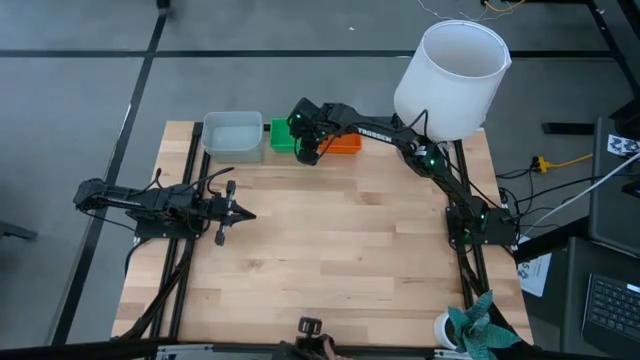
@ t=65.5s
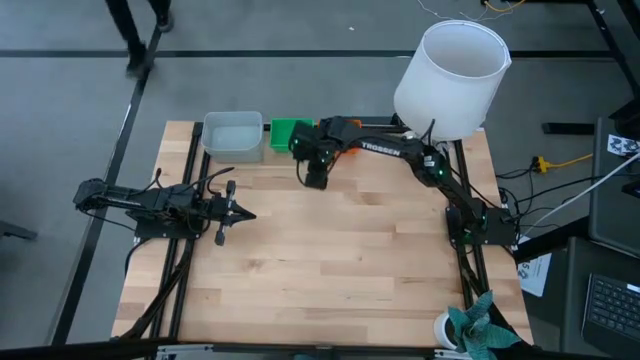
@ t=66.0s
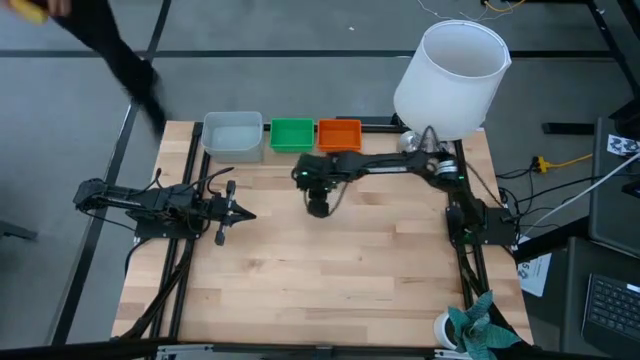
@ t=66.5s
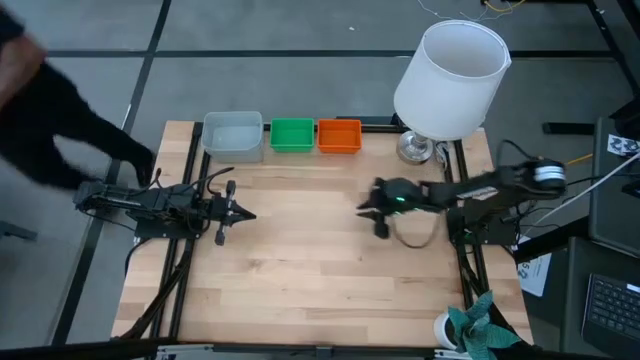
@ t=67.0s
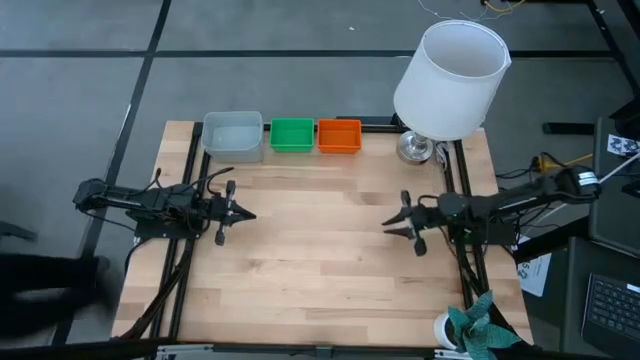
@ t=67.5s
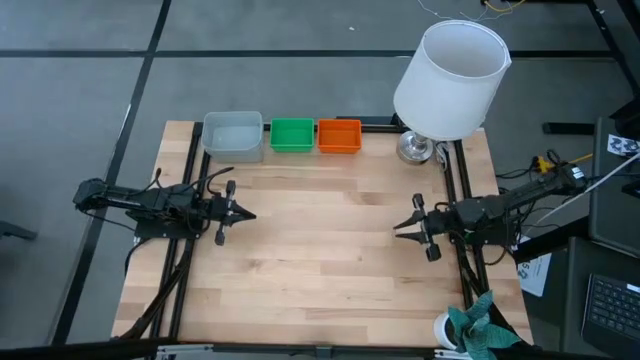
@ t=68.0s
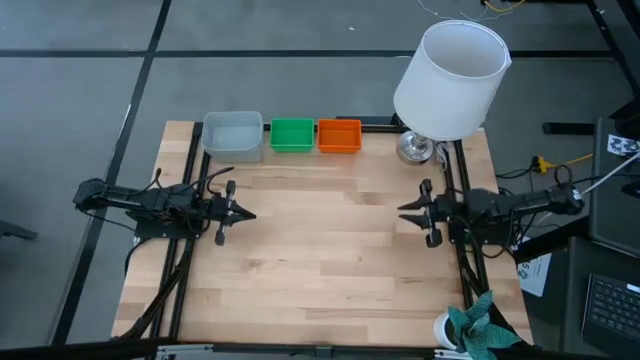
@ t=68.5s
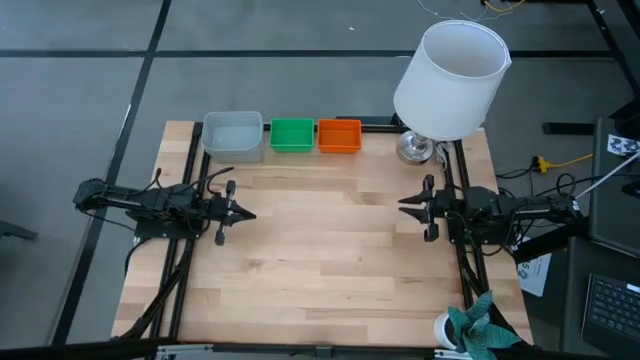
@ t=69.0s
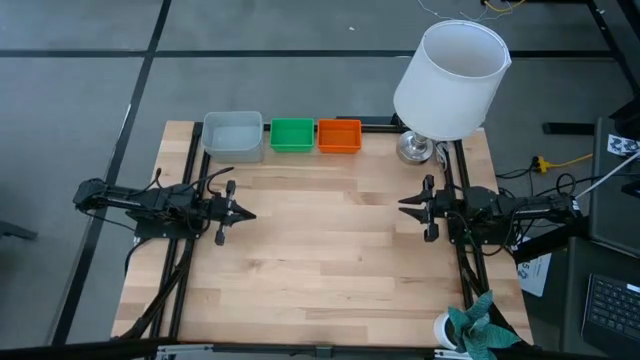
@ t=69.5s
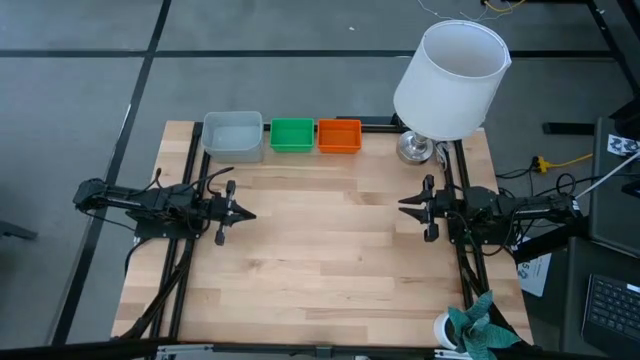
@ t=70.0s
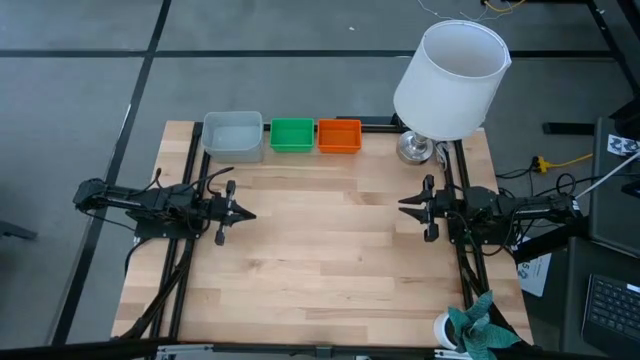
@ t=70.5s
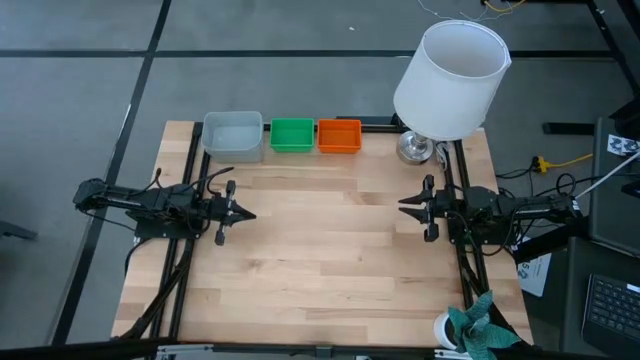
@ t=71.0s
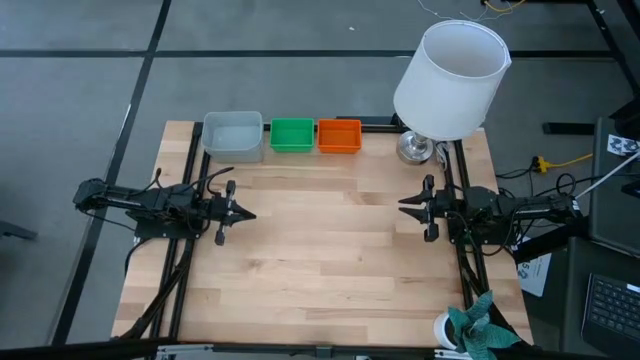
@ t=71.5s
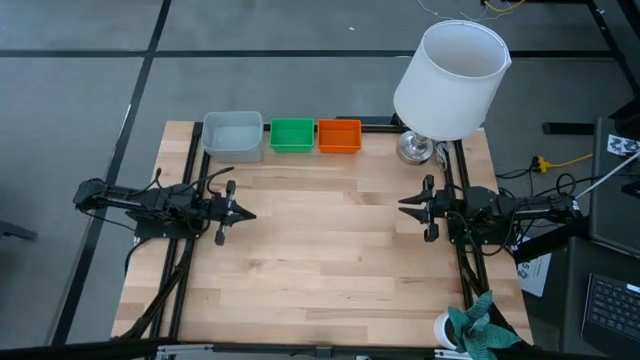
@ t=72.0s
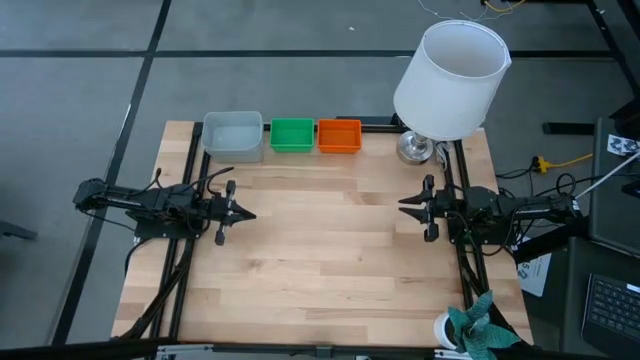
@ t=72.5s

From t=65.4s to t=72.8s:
Return to Home Position

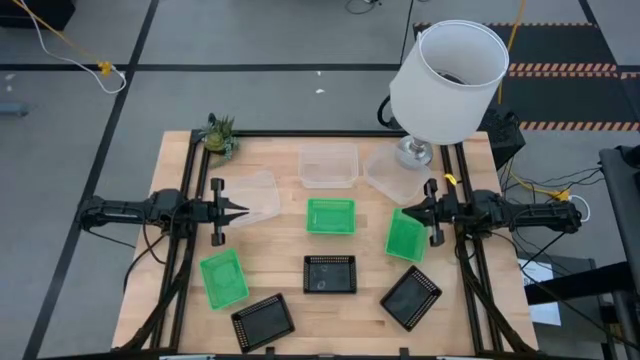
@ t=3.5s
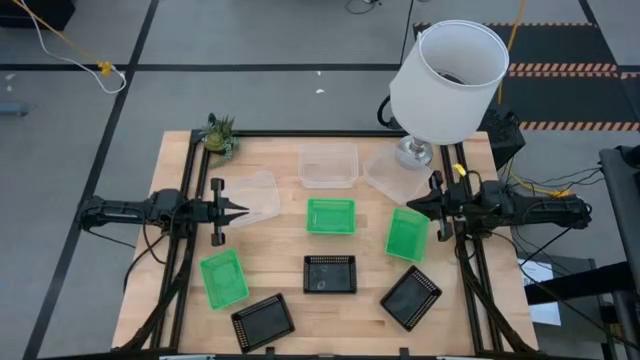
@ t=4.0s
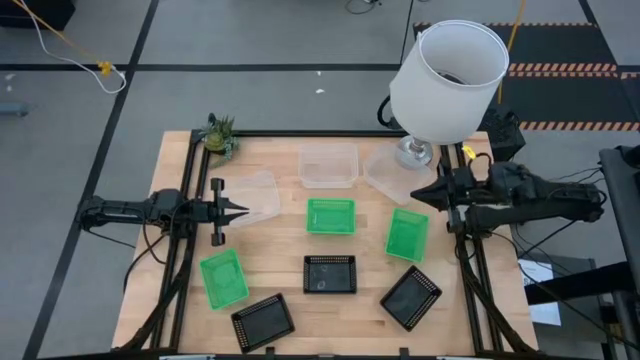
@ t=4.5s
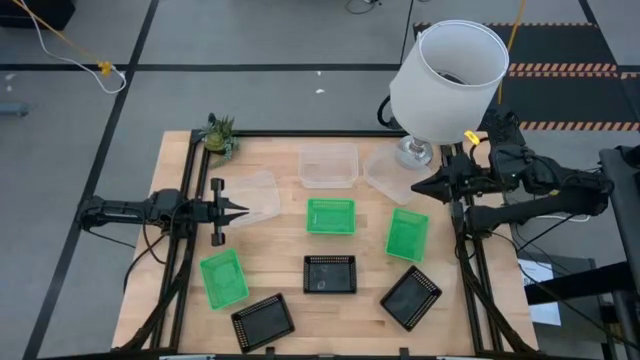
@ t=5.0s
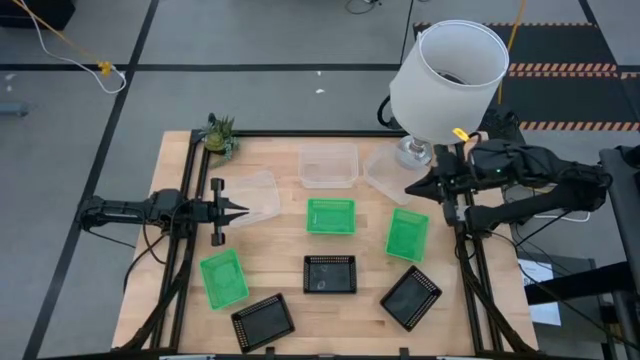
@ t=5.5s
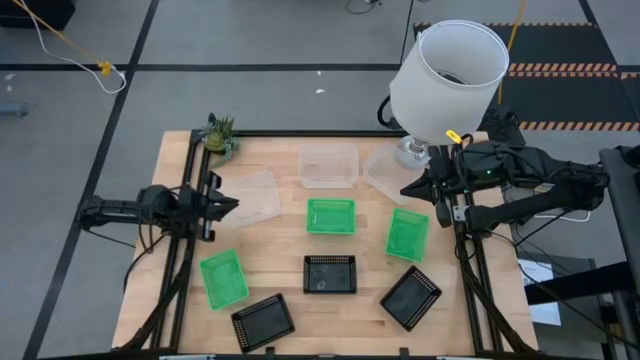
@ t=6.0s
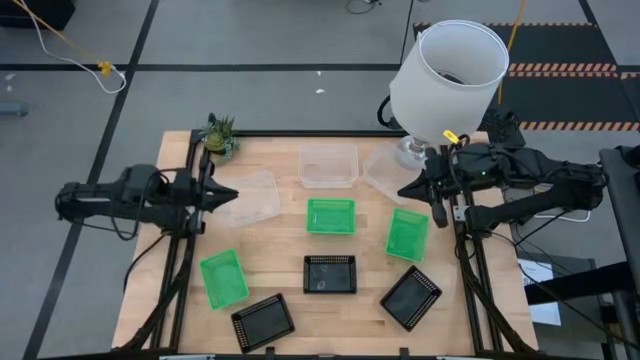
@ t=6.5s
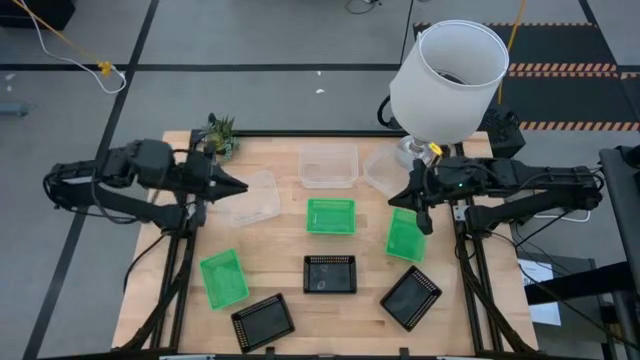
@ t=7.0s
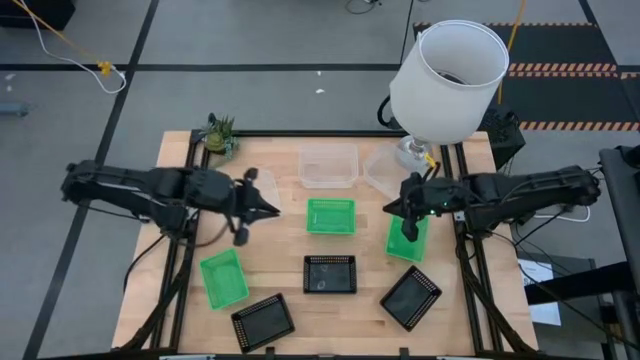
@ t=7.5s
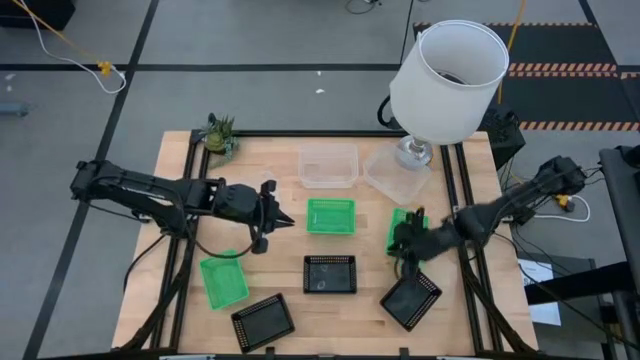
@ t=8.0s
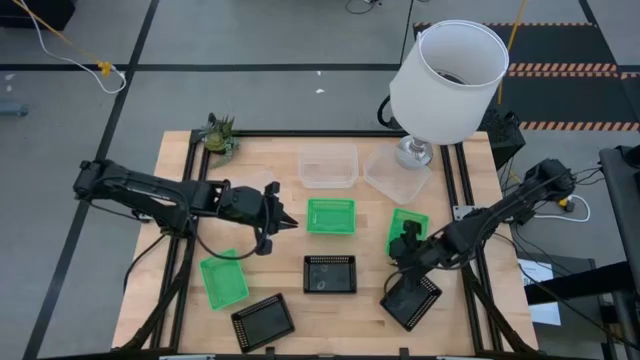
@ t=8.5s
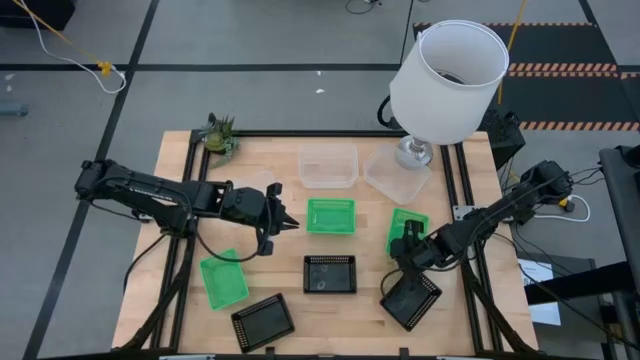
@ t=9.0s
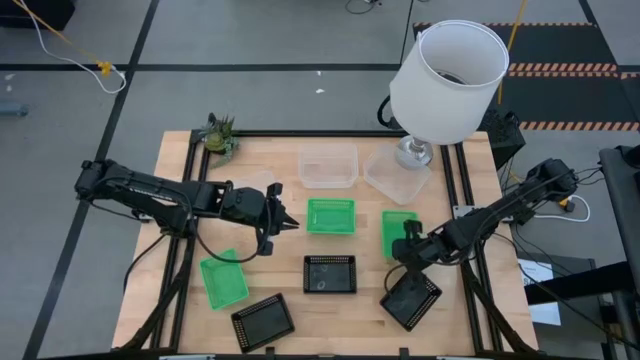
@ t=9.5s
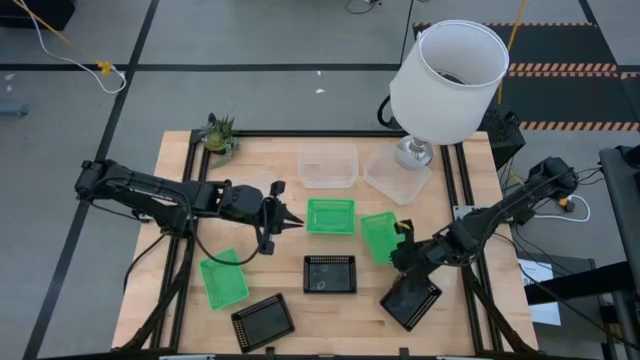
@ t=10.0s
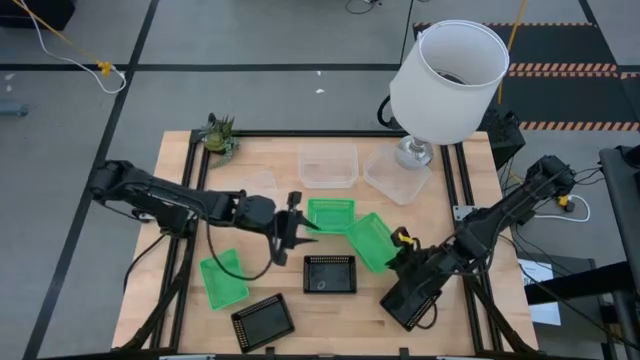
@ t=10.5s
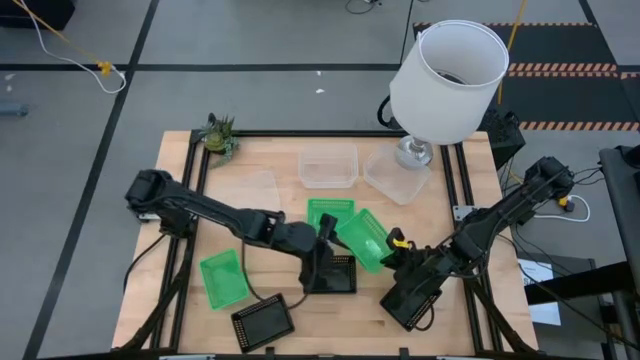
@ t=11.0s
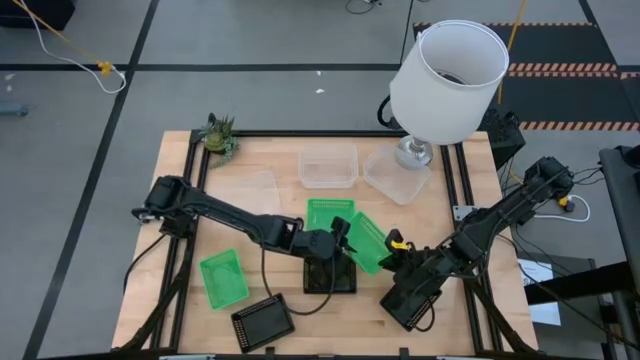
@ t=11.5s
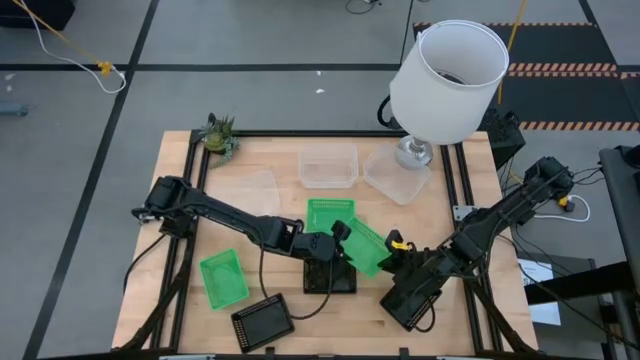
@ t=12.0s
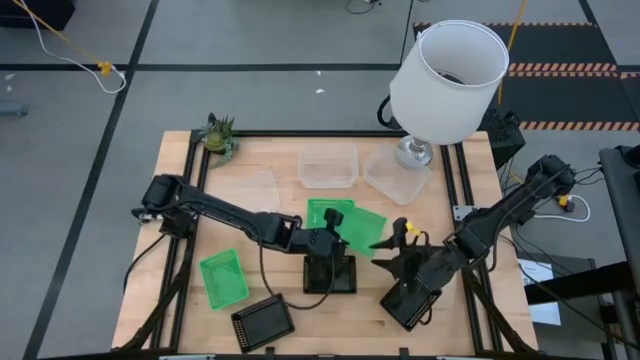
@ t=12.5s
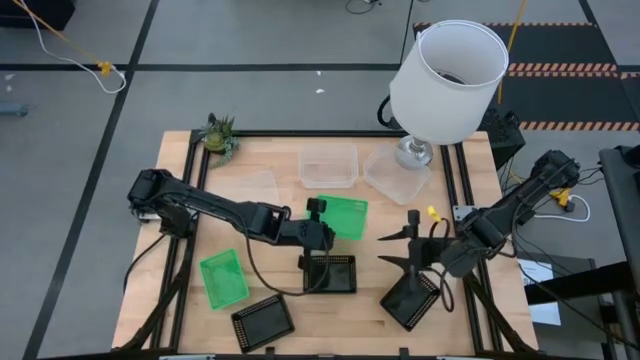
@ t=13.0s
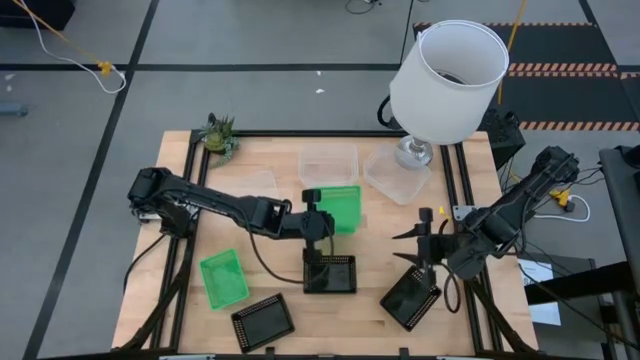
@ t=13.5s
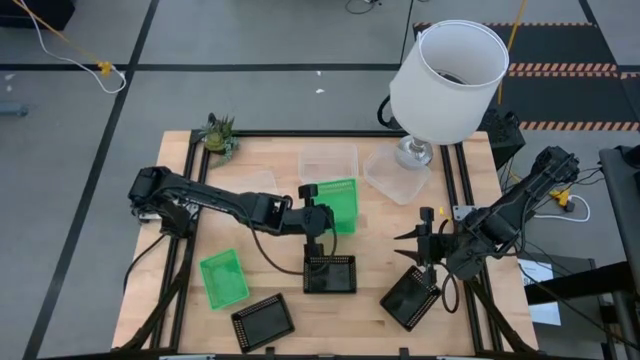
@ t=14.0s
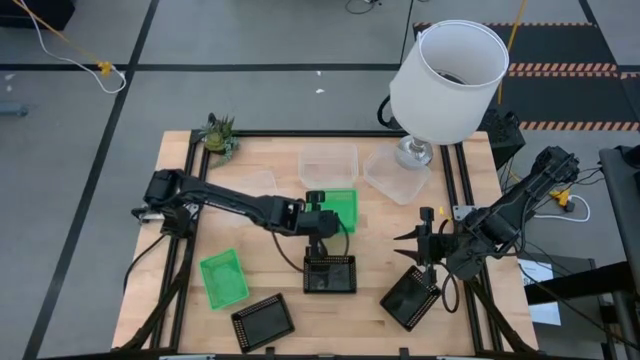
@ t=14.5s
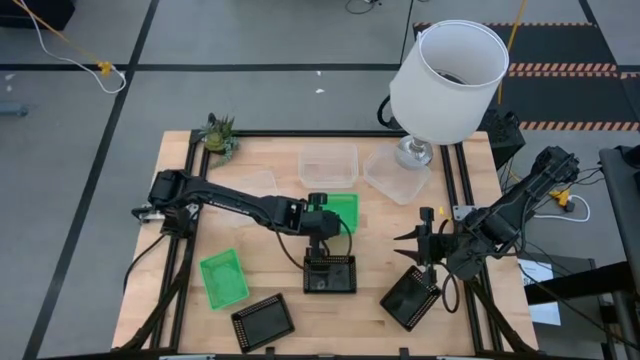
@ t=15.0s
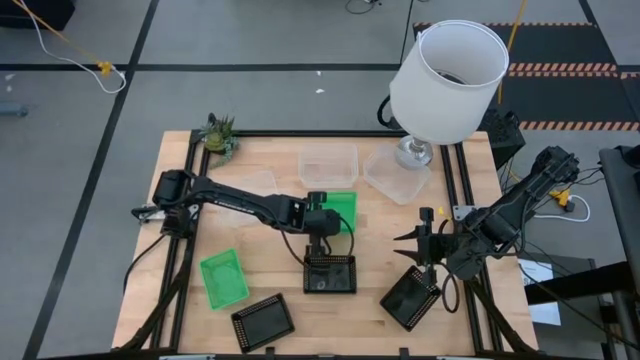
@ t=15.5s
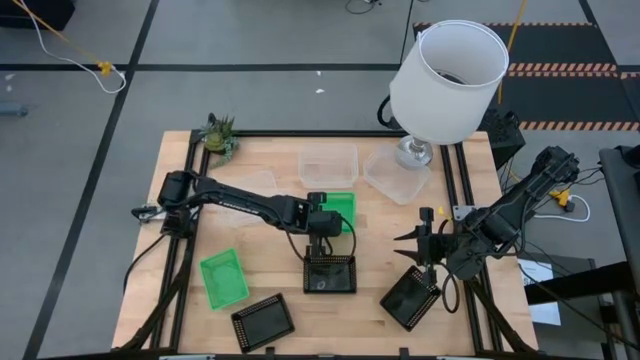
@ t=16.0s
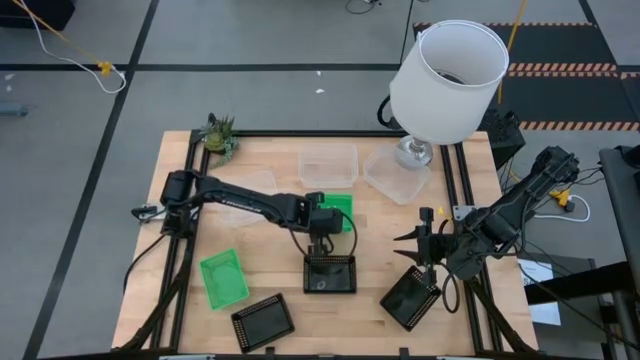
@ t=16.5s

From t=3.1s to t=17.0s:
Stack the right green bin on top of the middle green bin
